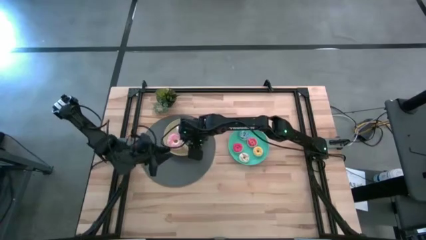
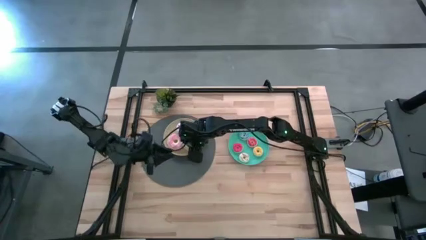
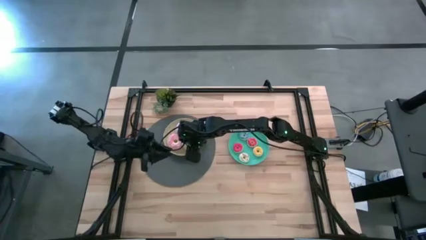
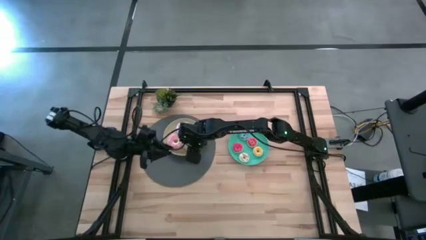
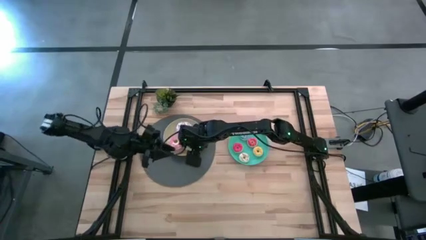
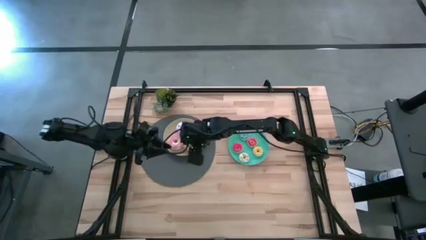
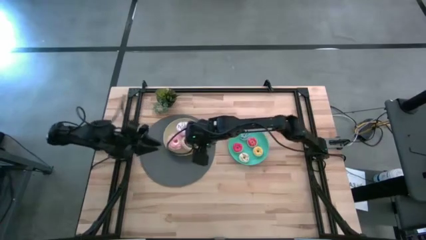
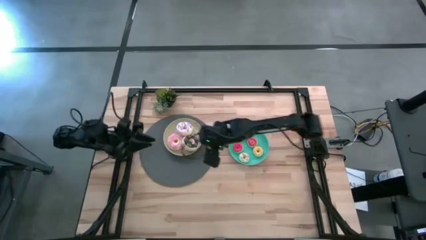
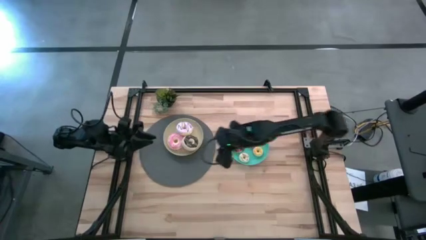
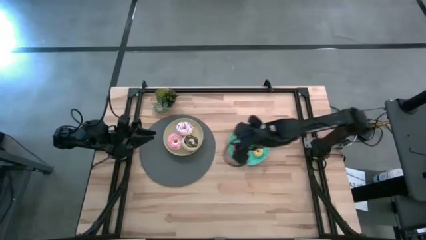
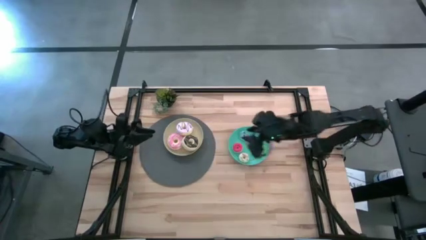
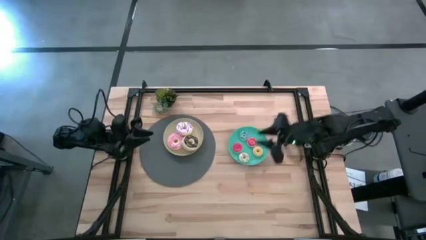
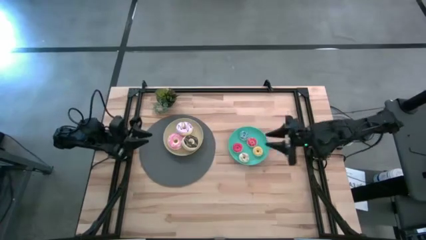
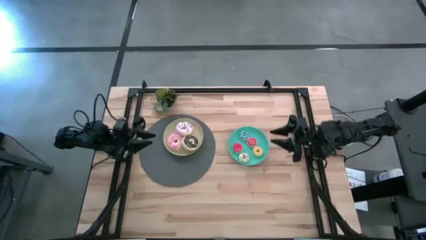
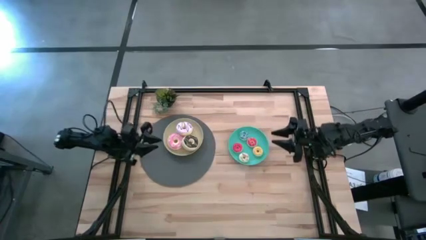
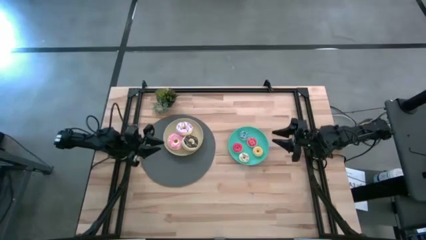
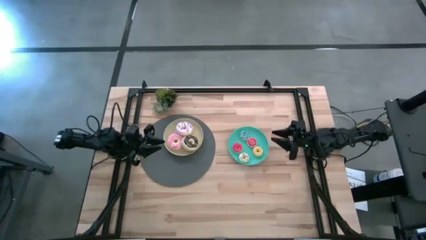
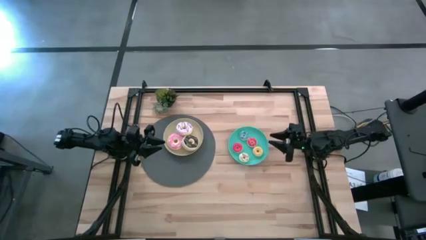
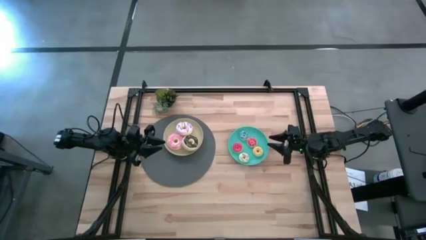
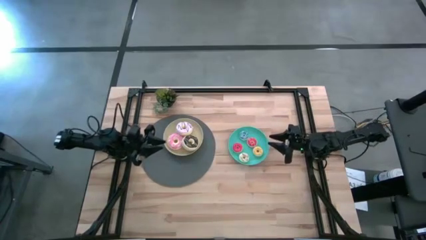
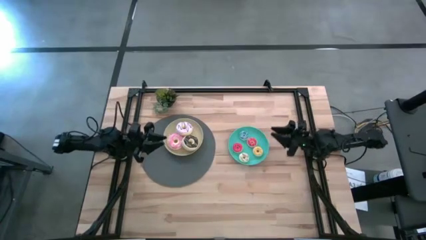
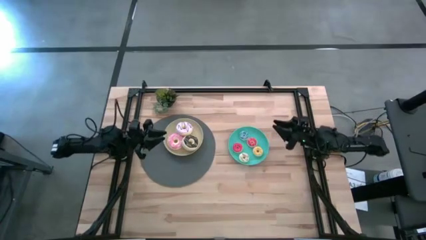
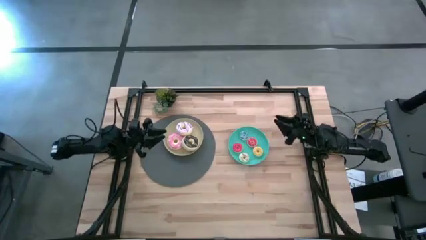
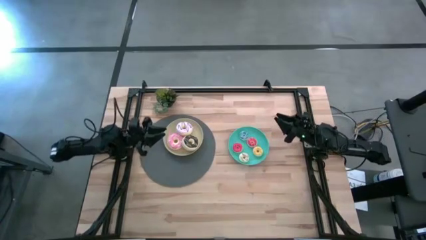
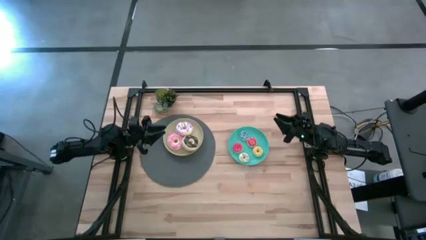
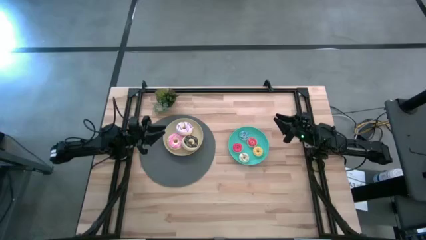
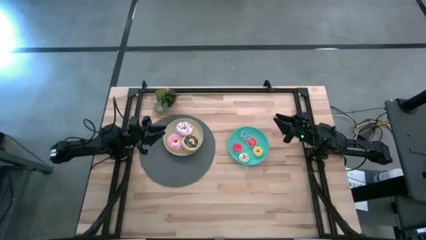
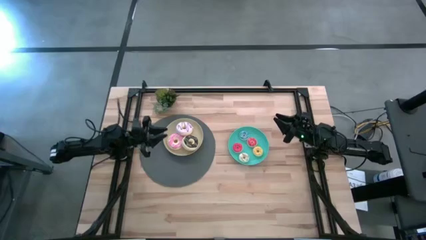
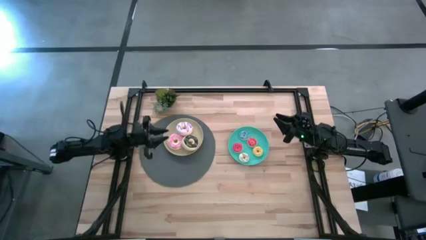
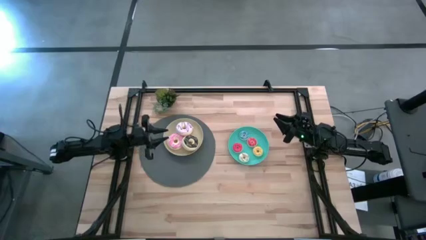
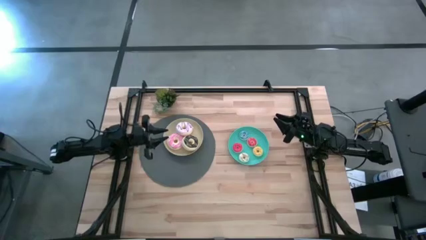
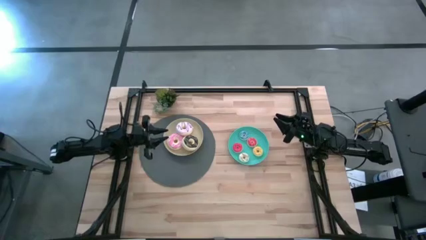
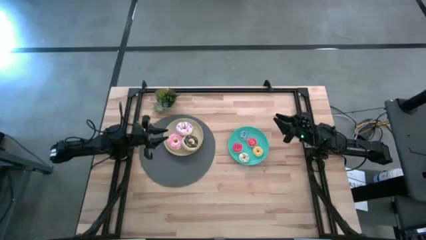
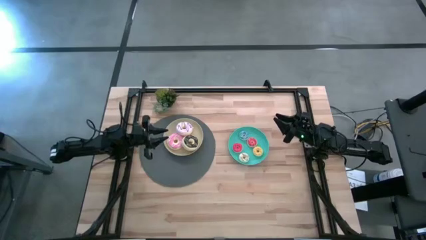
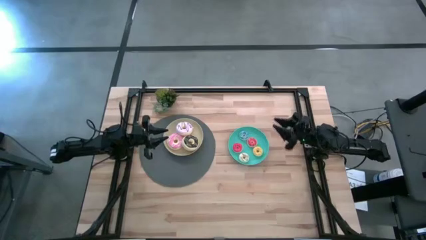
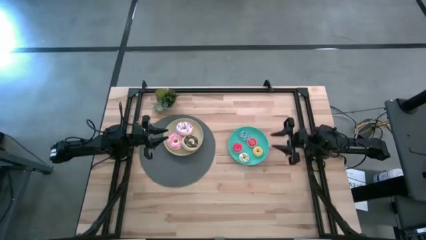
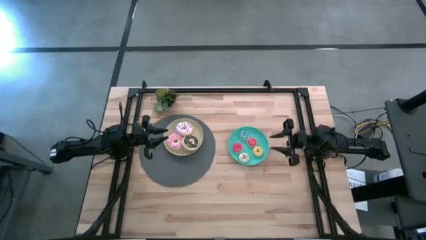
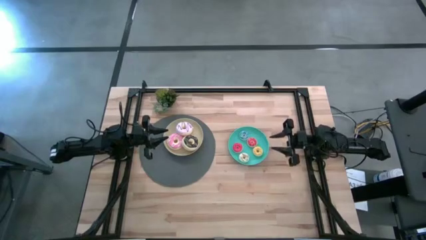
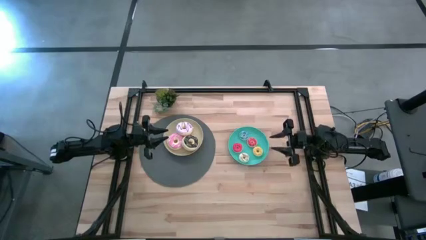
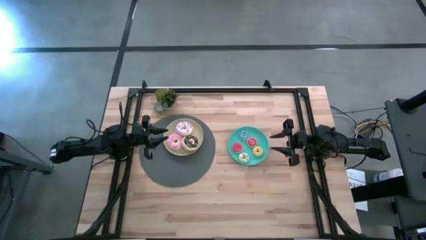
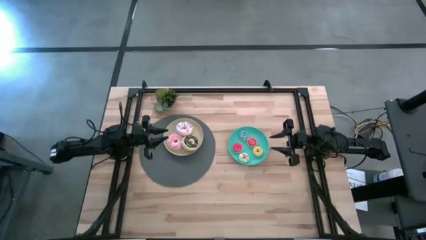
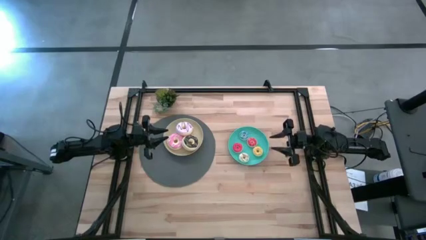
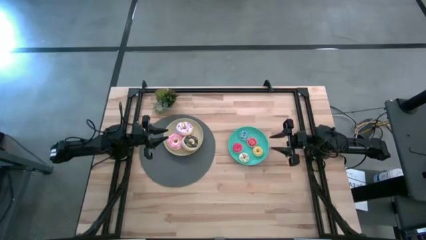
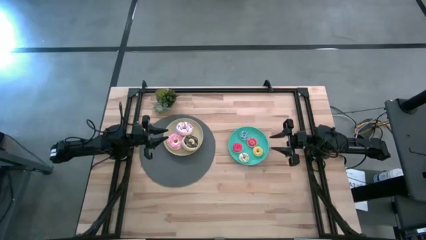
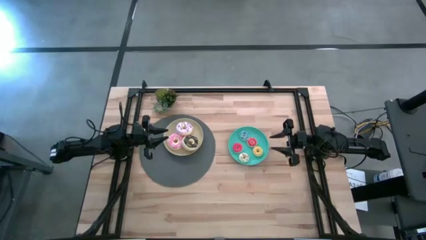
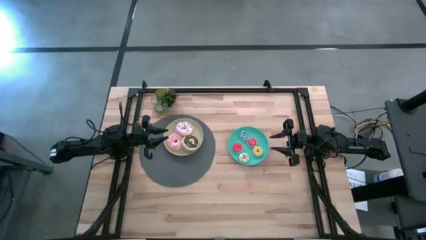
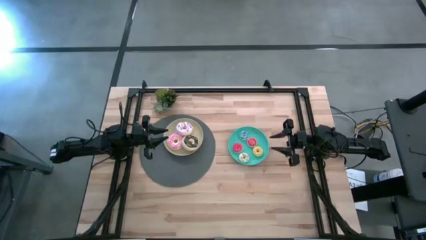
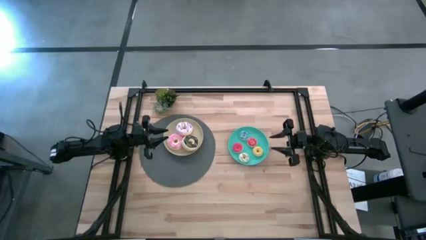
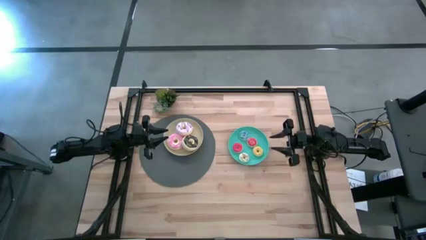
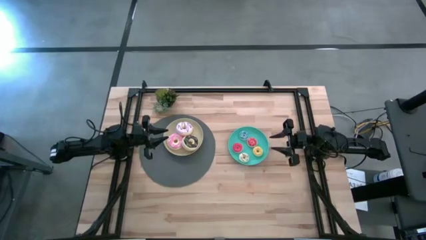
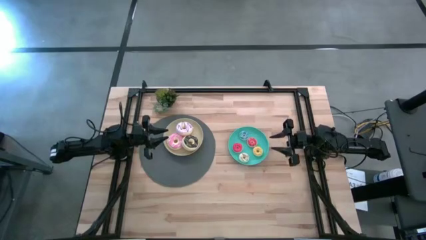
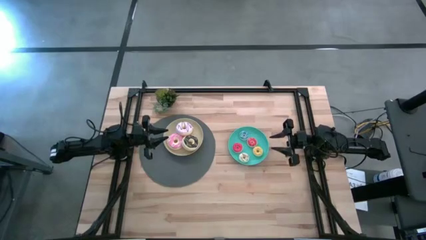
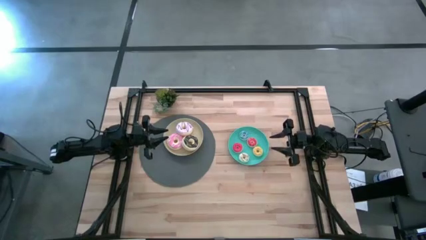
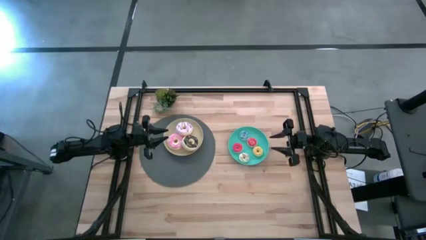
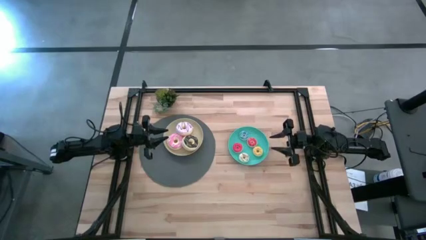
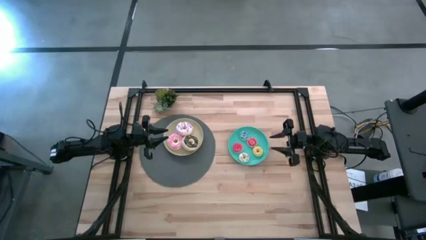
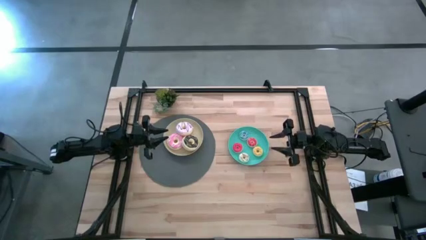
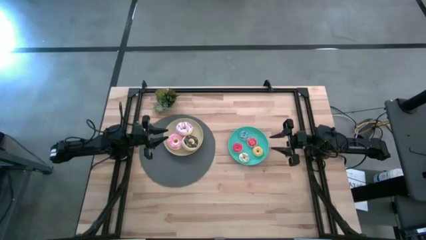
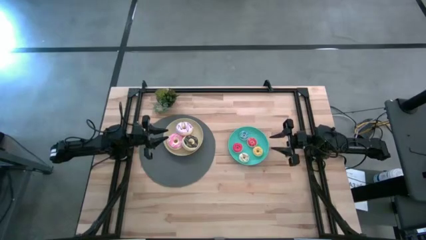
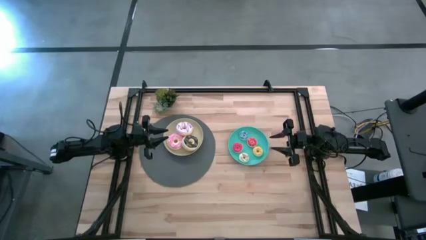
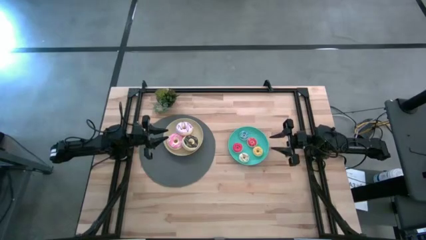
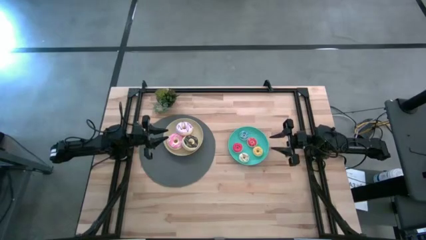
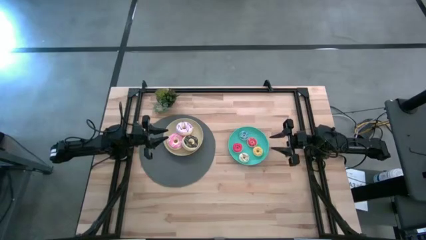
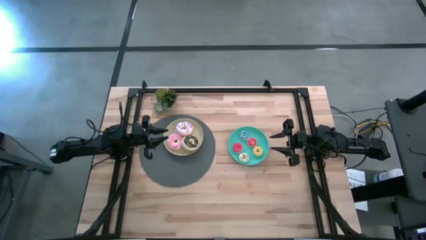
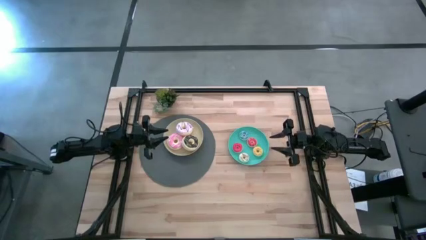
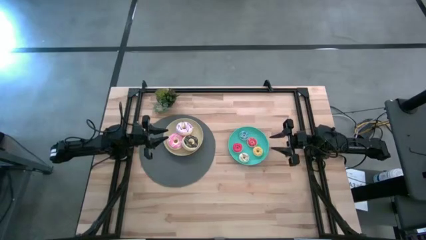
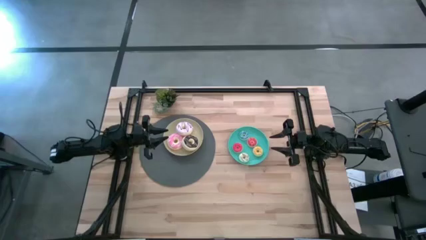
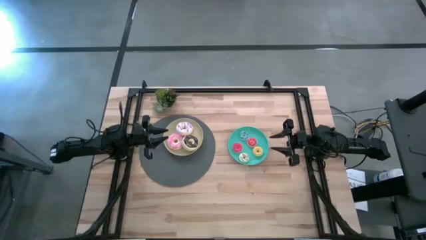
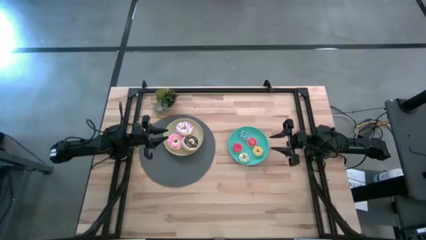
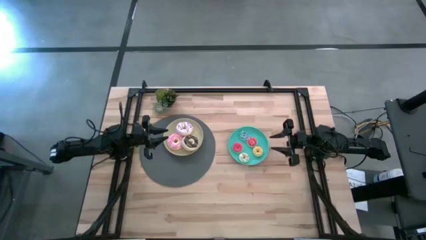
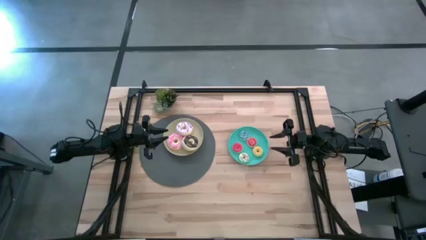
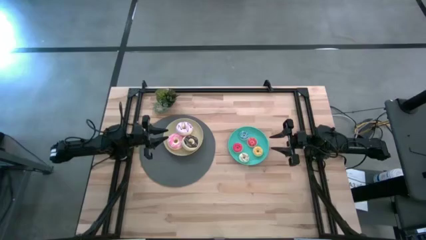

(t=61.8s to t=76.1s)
Task: Pick & Place donuts
Return to Home Position

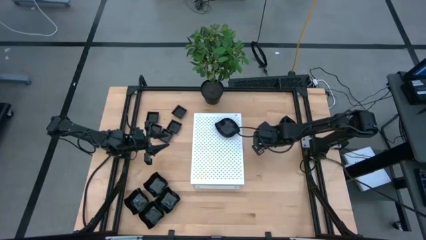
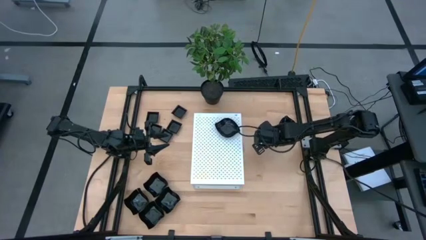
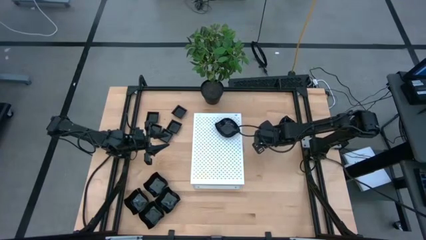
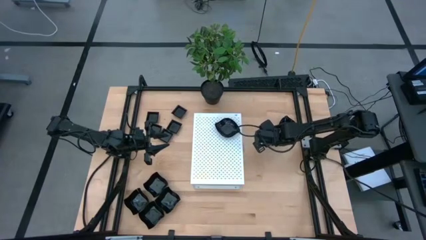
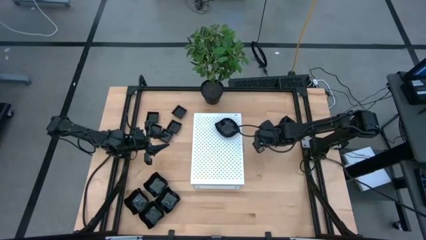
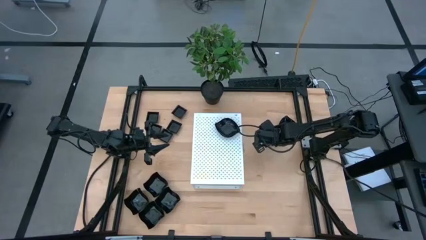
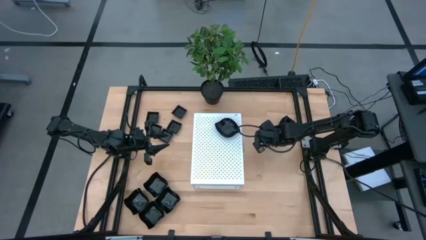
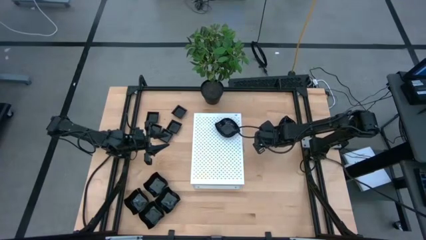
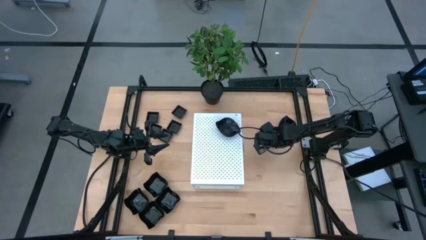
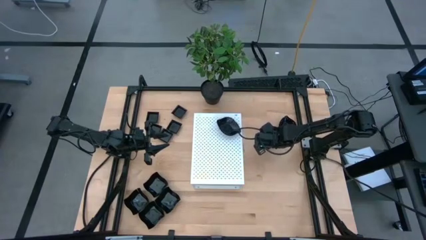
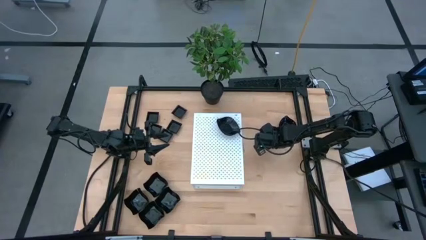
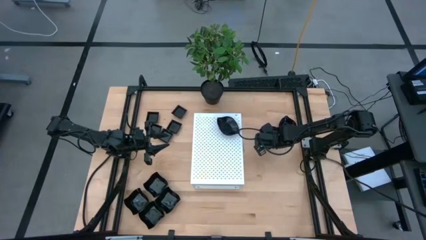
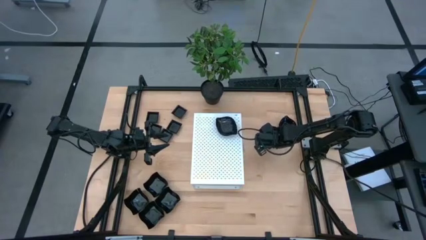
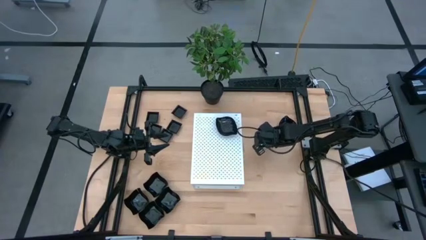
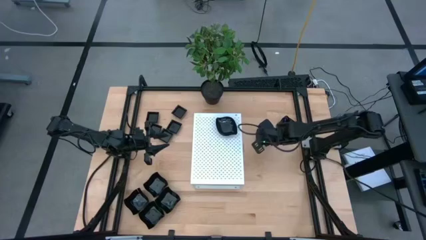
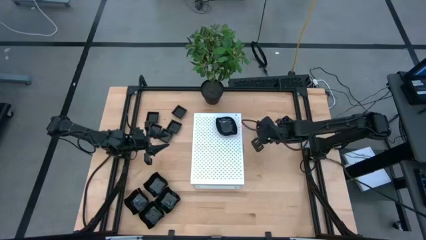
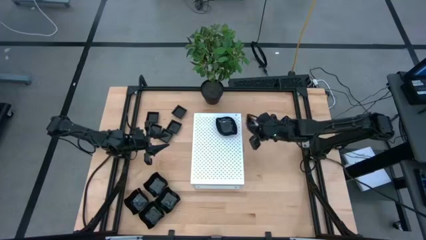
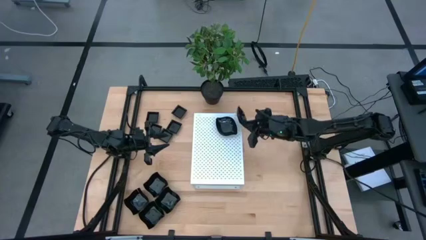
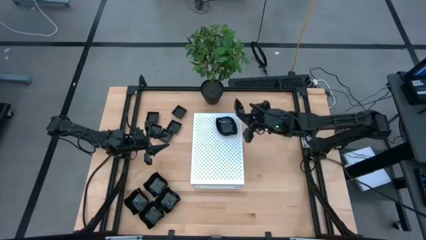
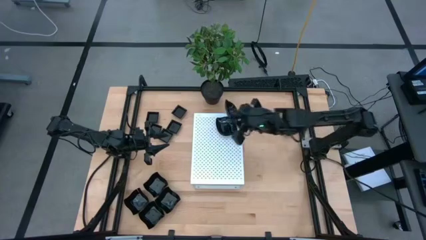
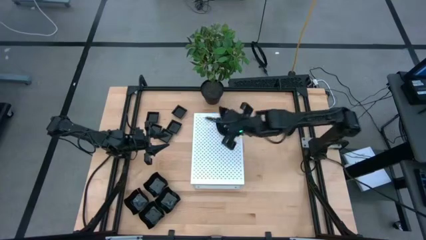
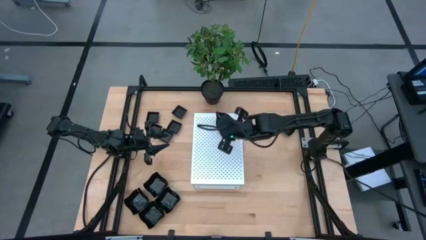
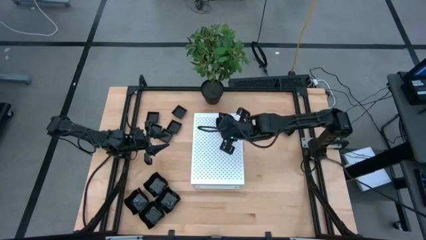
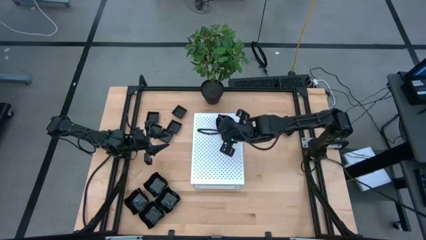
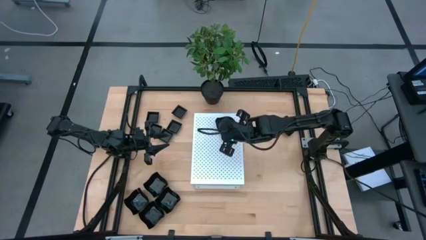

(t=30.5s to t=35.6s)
Task: Pick & Place Mini shaped plates
Stack the black leaf shaped plate on top of the black leaf shaped plate on the shelf
